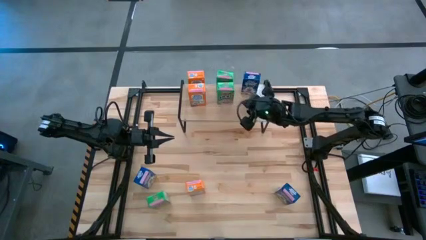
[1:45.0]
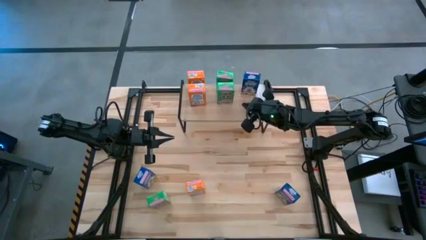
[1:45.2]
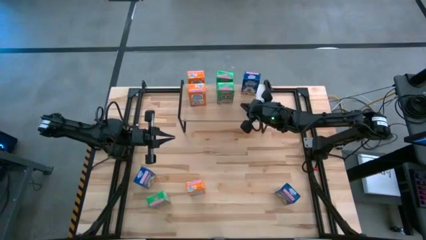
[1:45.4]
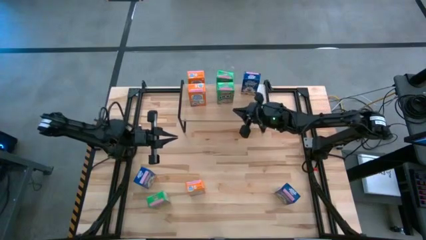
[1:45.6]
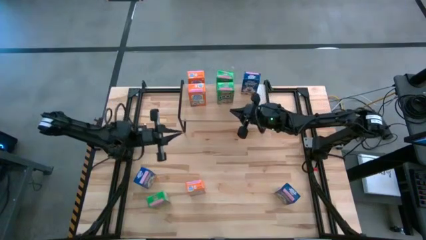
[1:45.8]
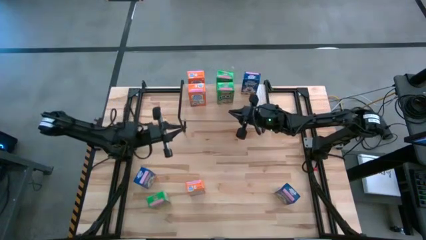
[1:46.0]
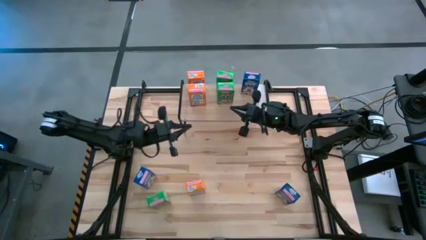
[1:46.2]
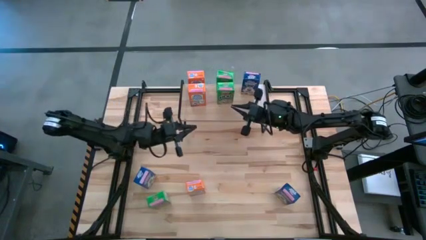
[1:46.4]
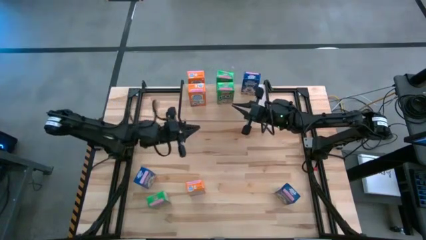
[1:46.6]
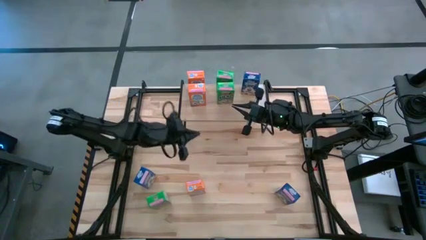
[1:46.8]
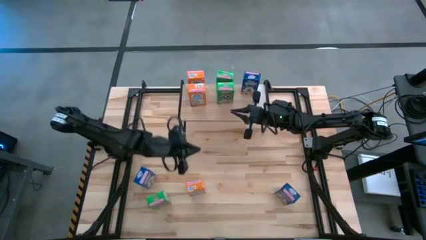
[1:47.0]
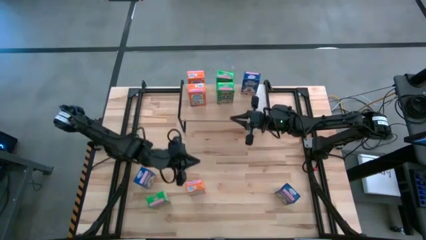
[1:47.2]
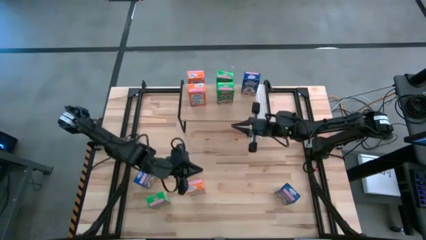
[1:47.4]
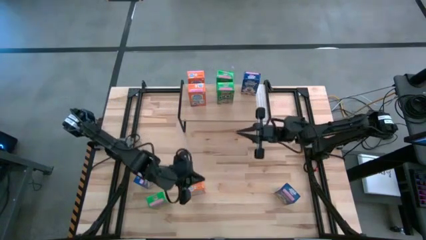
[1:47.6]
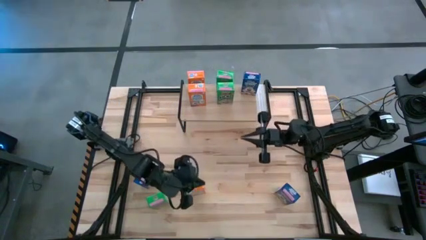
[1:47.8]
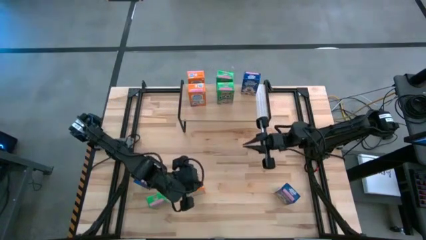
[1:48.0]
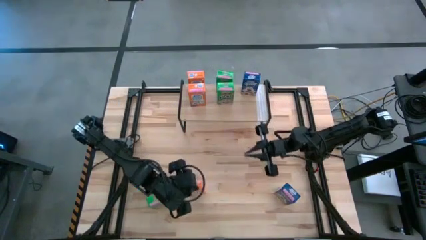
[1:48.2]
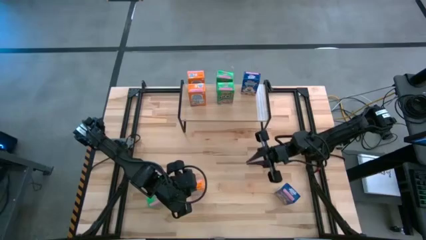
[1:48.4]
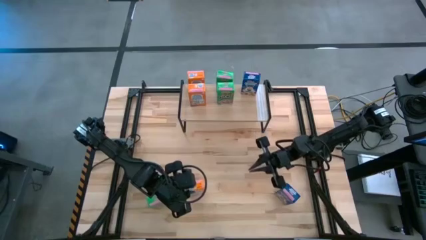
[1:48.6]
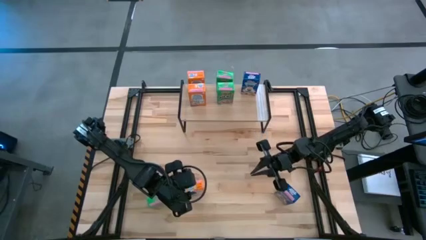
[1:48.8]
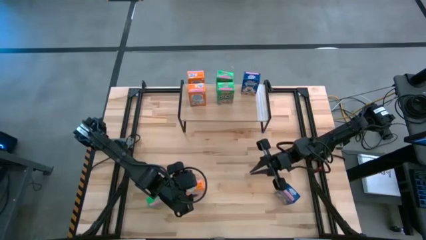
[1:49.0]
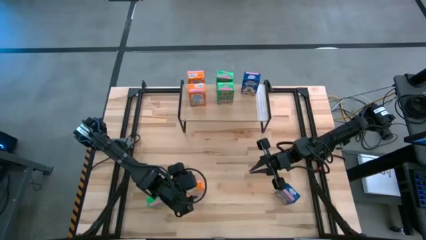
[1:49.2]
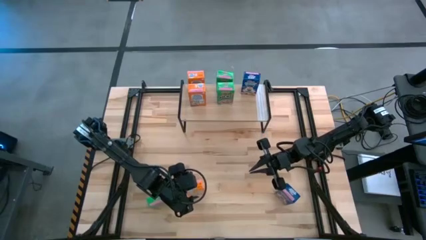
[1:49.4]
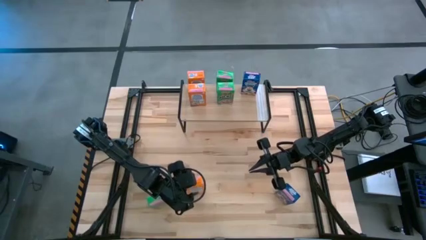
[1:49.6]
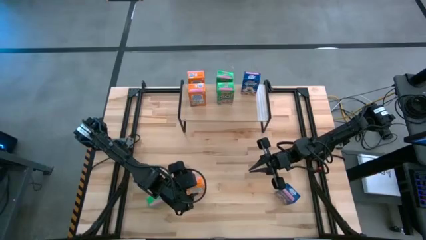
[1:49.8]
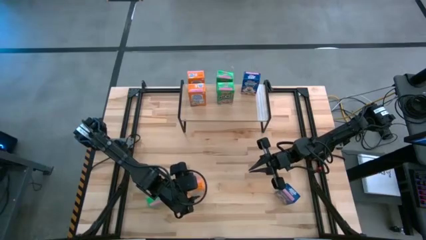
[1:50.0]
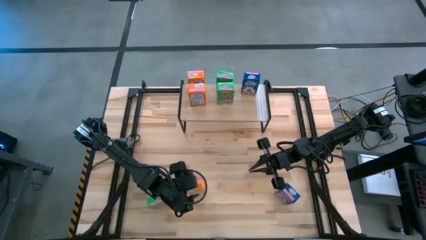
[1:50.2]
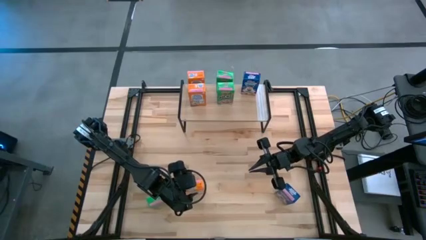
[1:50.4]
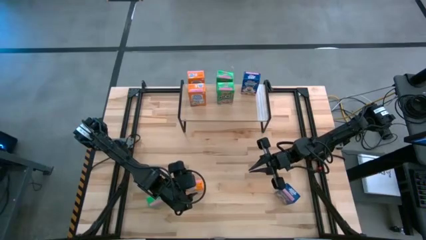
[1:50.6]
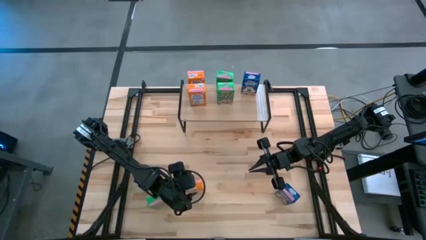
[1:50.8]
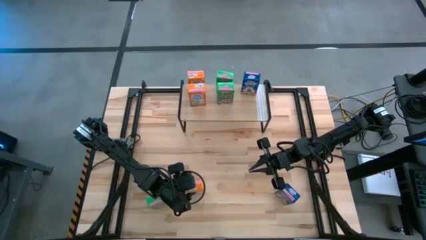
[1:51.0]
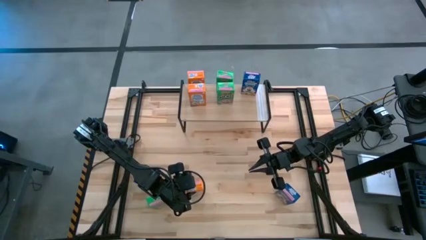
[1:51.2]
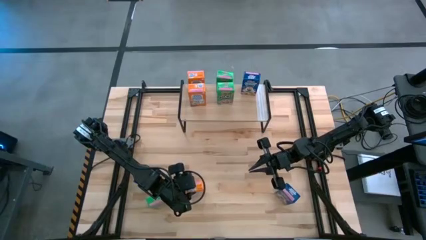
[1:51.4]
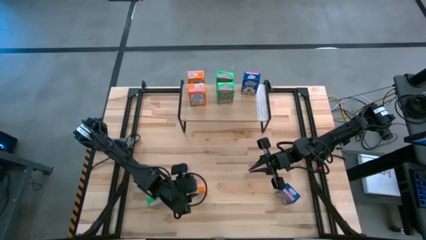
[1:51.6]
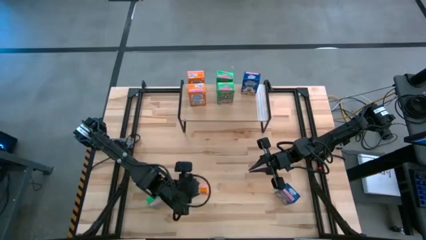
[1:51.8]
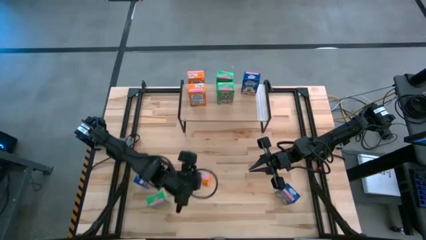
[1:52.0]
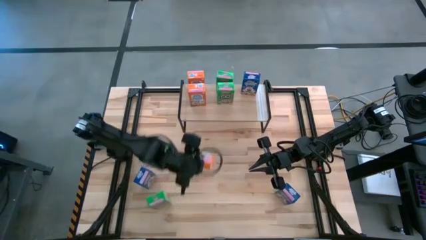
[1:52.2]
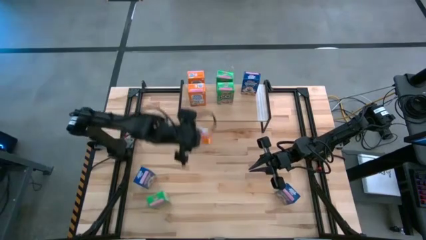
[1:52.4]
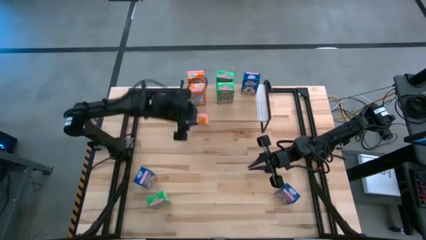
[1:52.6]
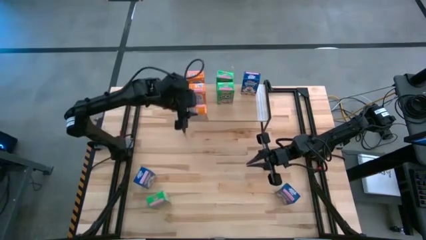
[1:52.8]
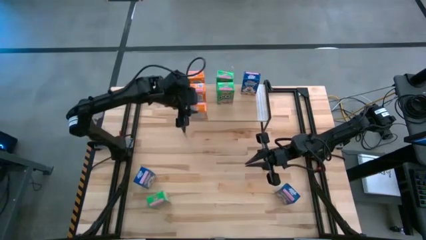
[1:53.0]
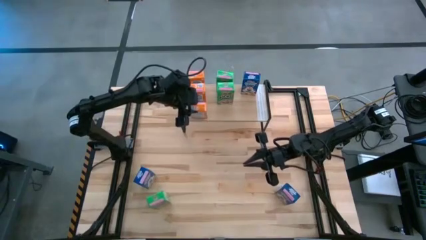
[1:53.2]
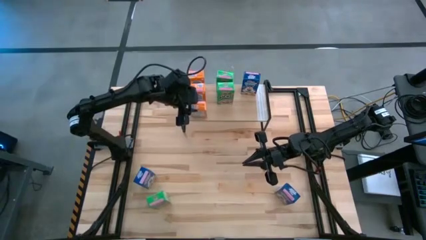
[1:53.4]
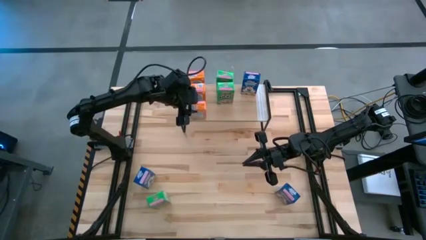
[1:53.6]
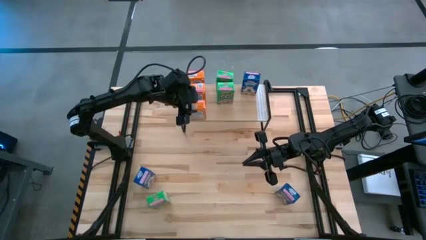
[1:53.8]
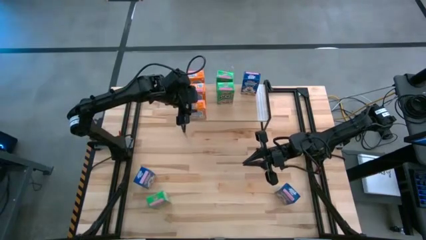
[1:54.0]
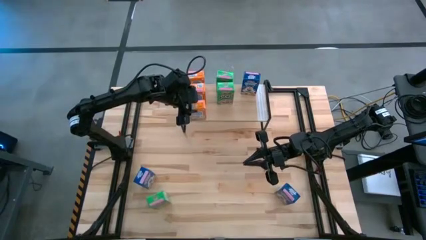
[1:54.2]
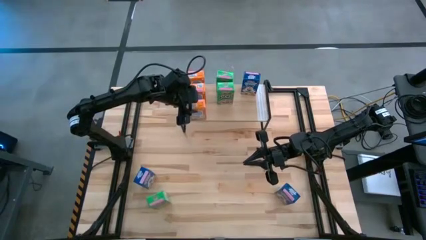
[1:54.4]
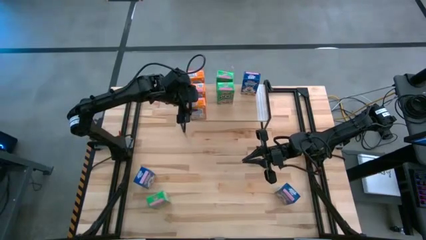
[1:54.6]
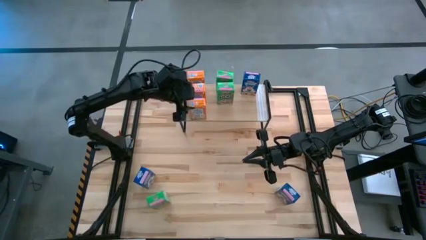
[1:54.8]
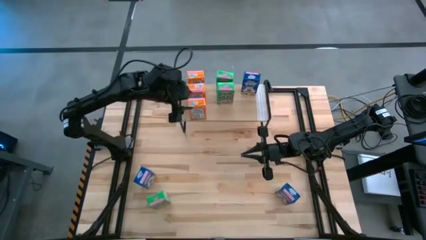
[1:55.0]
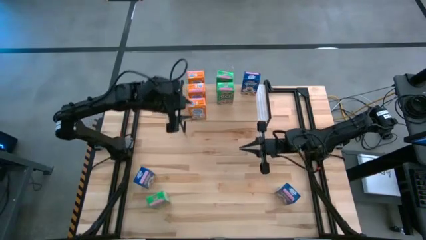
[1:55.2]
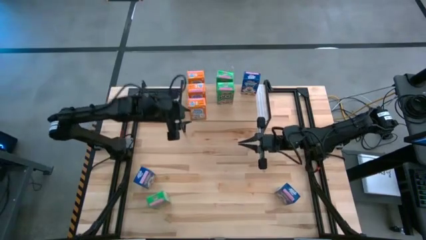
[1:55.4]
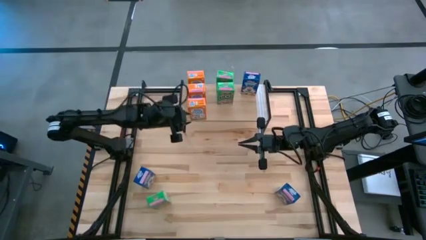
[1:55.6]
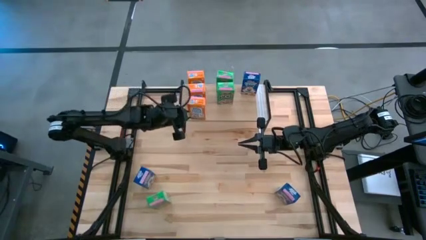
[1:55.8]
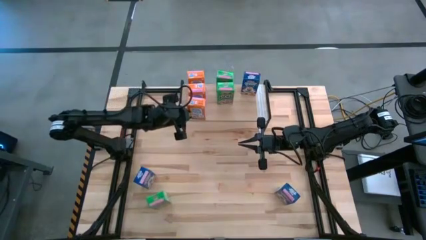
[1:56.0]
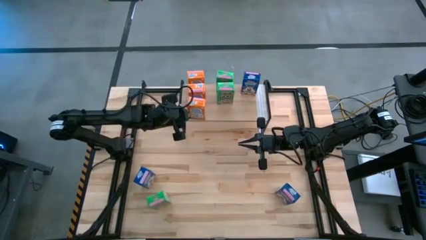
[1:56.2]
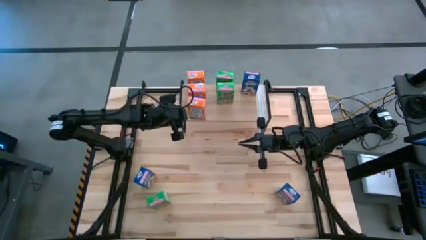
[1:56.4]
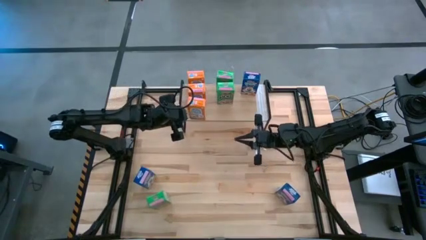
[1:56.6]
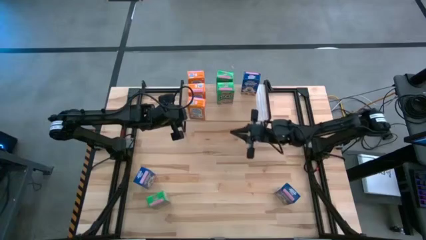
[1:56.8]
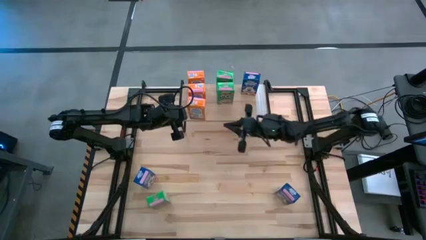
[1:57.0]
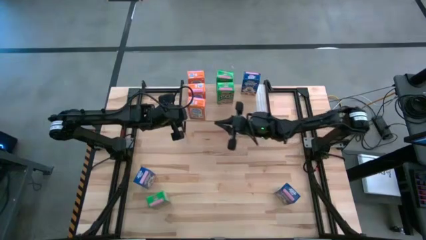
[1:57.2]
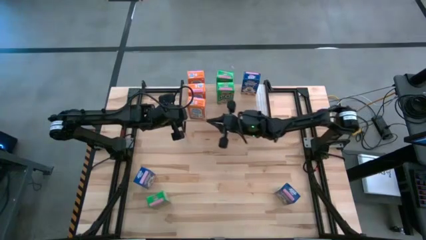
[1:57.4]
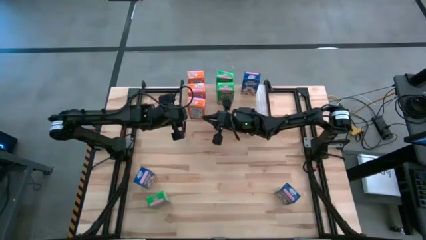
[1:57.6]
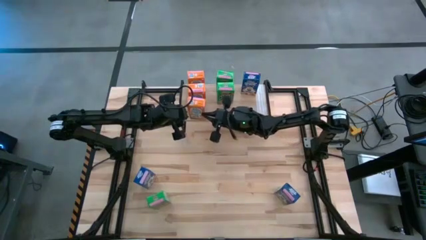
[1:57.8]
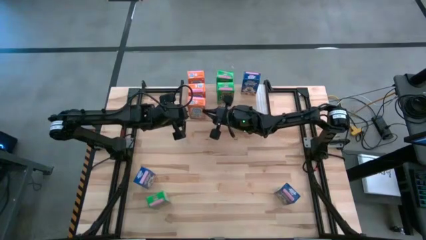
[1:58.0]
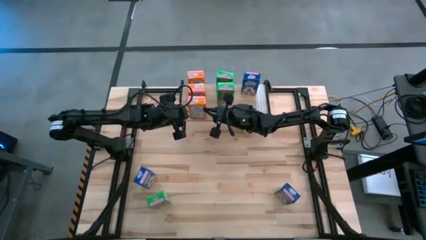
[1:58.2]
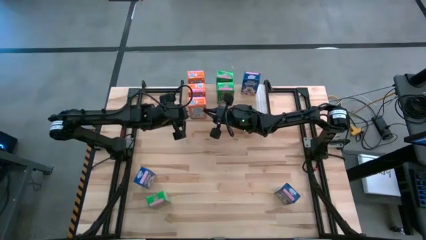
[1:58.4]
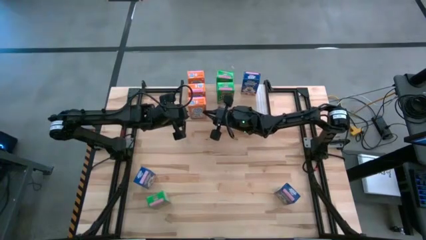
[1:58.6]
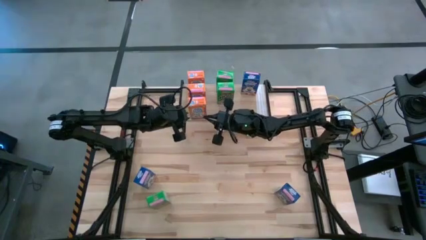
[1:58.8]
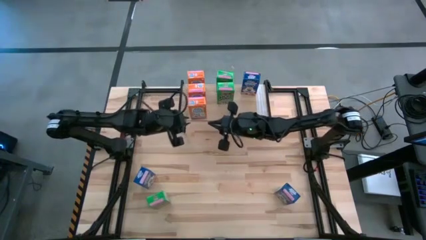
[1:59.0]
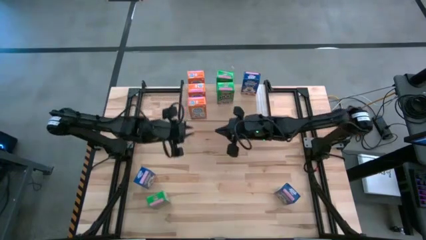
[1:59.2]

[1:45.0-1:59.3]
Task: Stack cereal on shelf
Put the orange cereal box aligned with the other orange cereal box on the shelf
